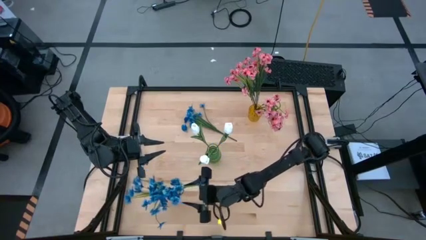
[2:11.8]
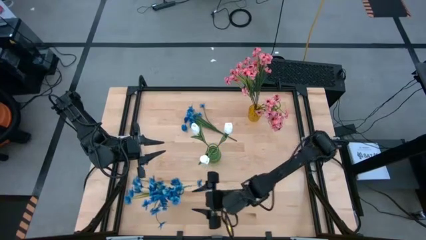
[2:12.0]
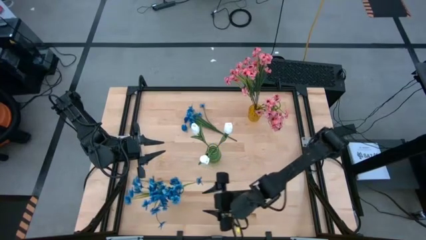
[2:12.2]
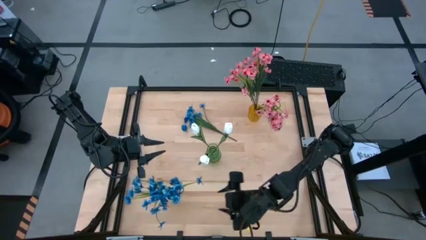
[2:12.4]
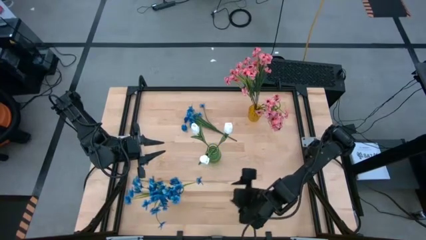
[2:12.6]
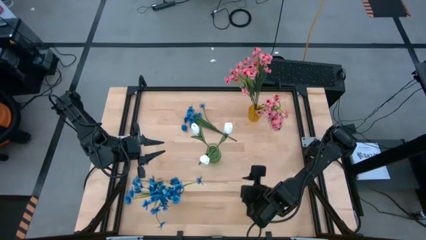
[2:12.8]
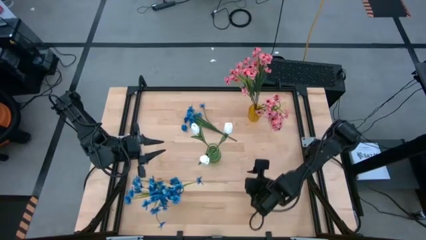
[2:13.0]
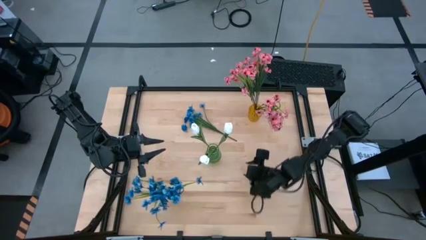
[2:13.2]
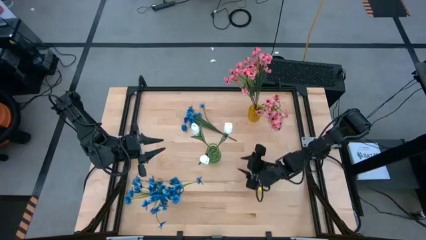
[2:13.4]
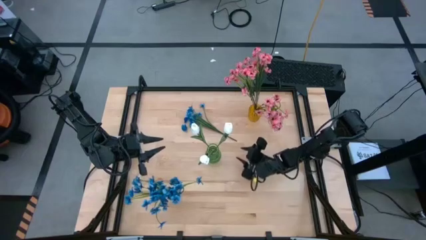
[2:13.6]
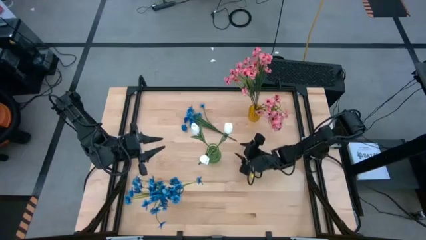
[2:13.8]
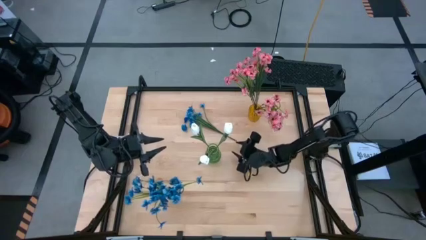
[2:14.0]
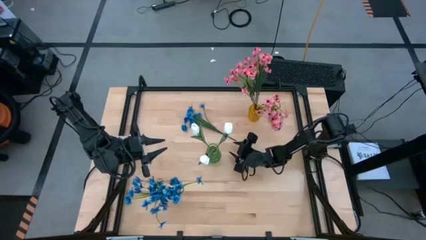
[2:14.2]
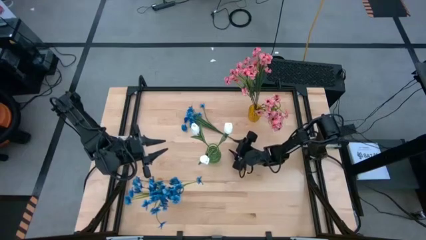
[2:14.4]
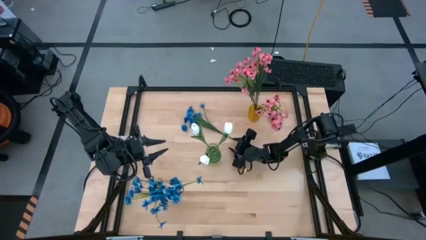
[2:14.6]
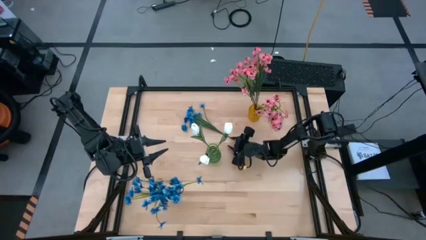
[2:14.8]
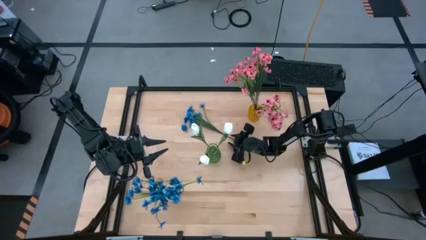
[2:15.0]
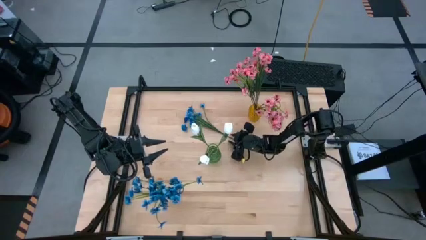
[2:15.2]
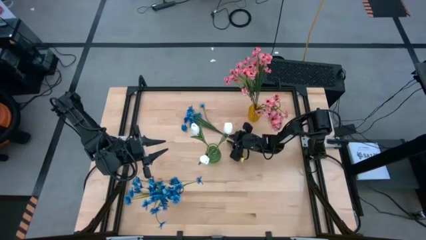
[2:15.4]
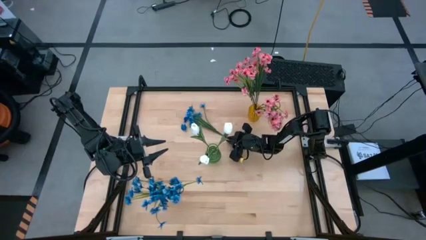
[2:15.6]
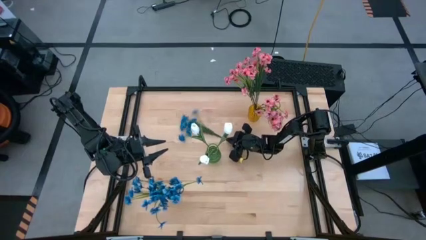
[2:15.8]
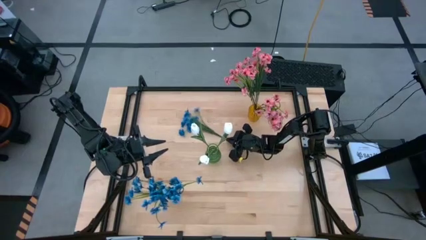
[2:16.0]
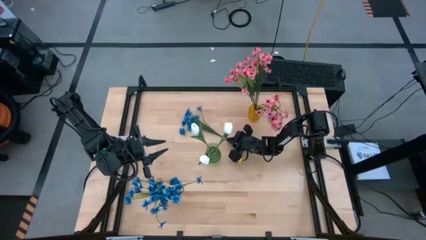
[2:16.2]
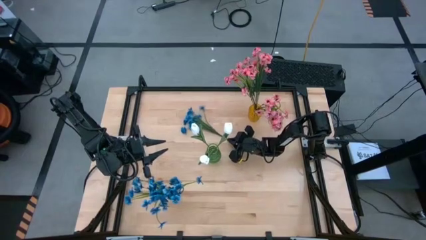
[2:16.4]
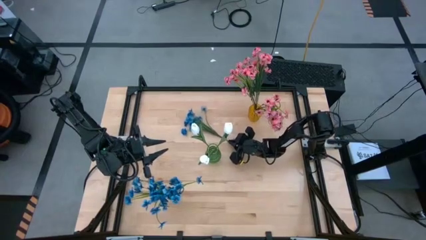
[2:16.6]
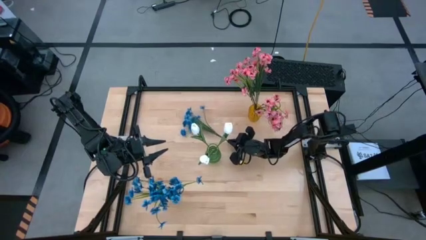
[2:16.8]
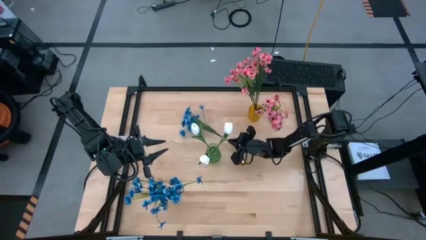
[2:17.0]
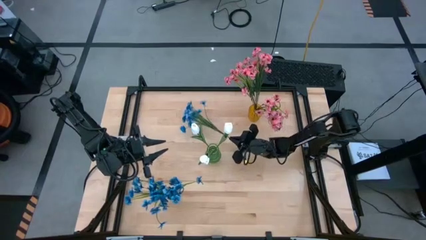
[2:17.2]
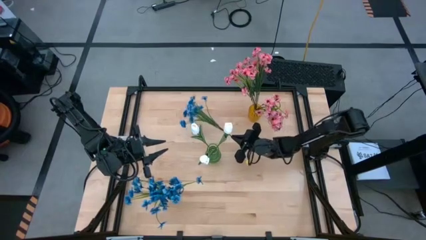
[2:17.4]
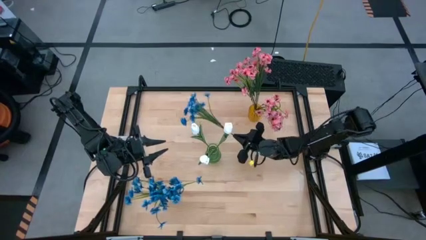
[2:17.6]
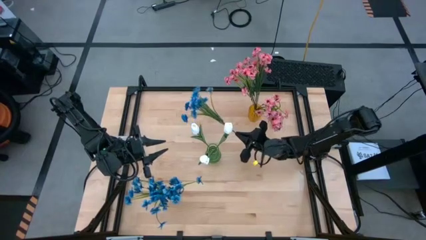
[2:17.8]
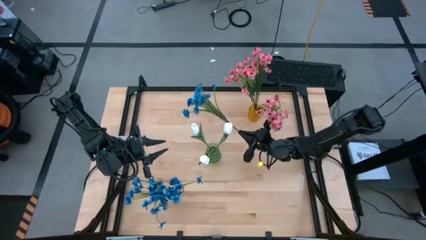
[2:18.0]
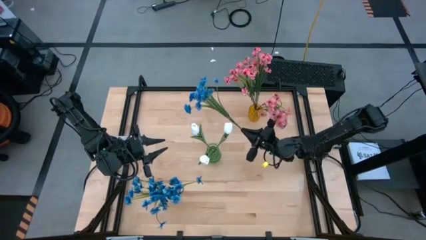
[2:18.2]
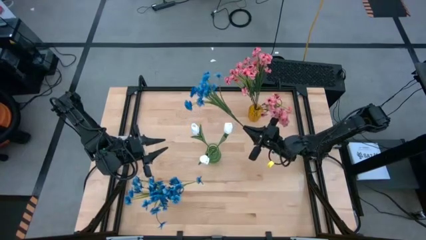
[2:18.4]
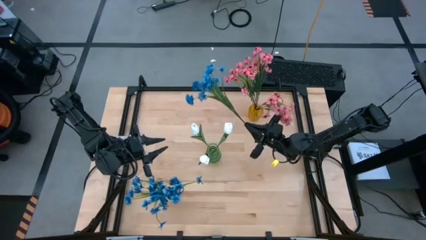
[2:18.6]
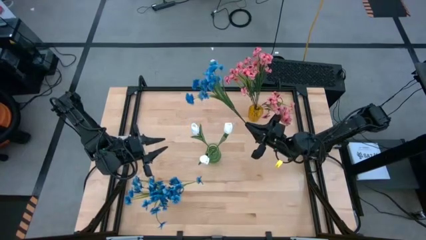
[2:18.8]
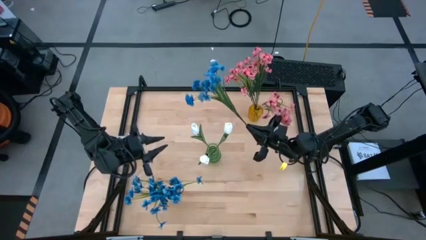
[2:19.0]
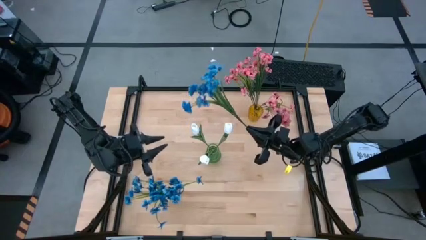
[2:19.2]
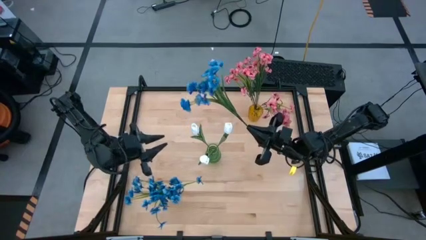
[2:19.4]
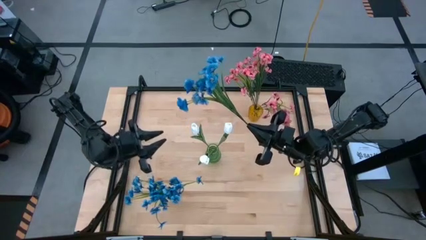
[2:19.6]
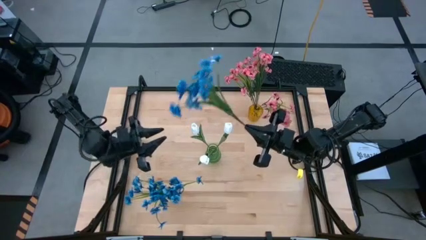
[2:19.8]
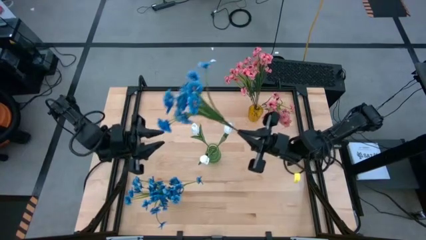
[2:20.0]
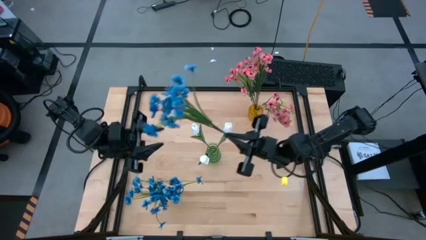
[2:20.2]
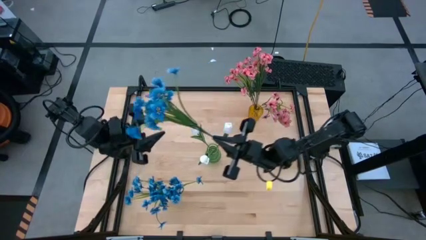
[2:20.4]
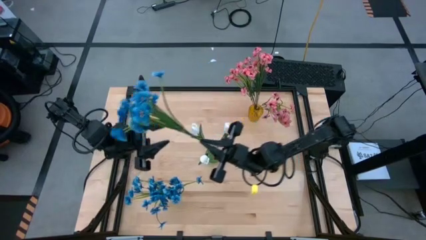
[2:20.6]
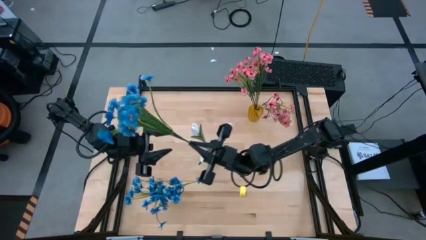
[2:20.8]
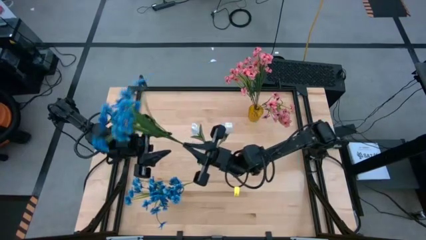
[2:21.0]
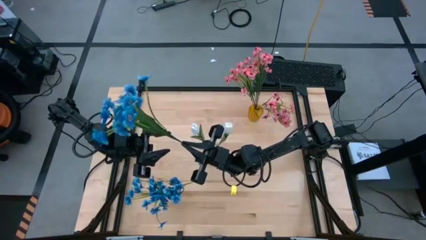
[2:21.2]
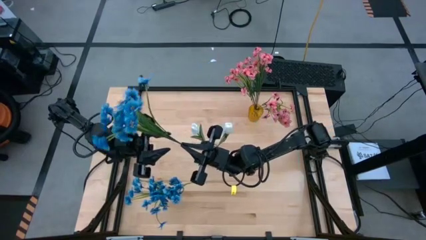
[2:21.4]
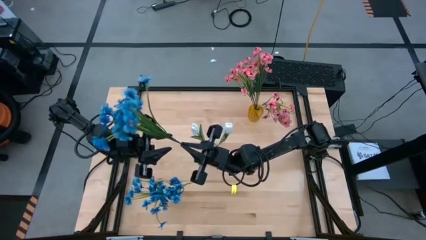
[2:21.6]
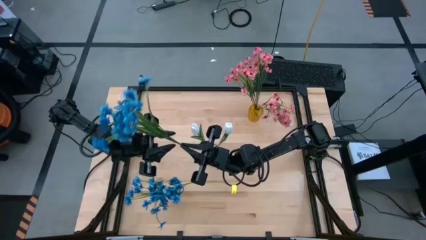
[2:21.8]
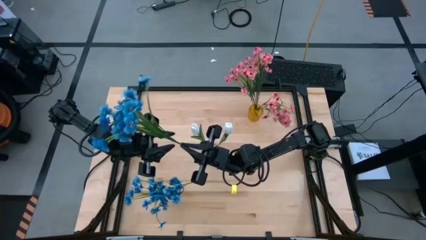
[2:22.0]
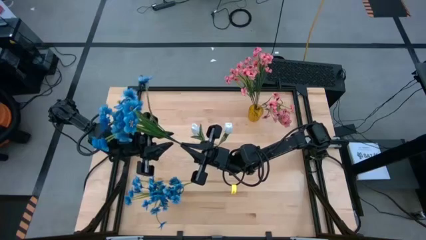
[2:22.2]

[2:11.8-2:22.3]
Task: Sort flowers into vase by color
Put the blue flowers into the transparent vase
